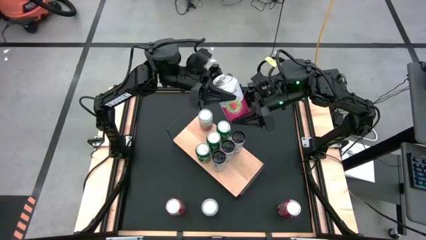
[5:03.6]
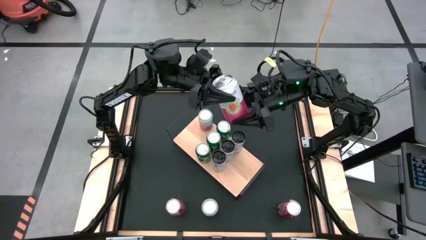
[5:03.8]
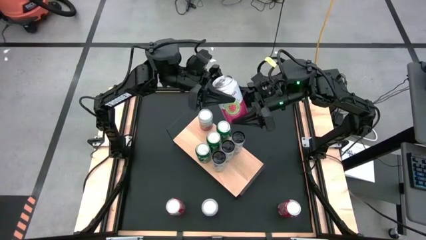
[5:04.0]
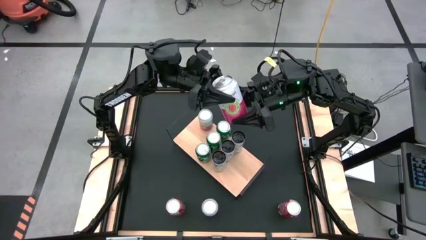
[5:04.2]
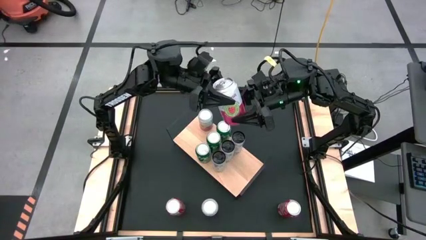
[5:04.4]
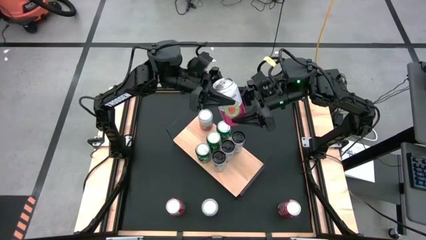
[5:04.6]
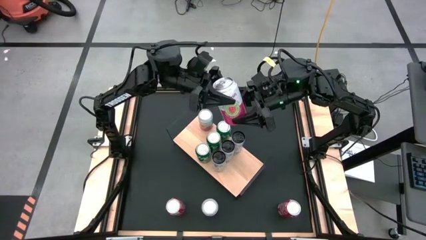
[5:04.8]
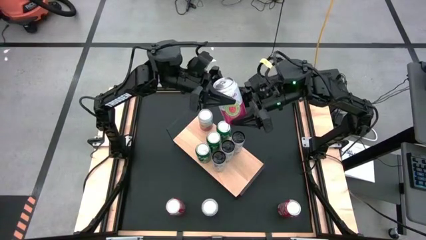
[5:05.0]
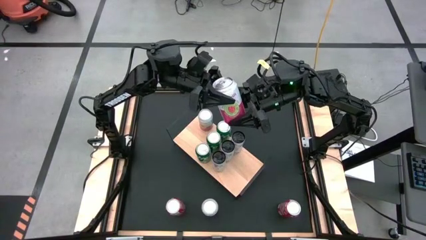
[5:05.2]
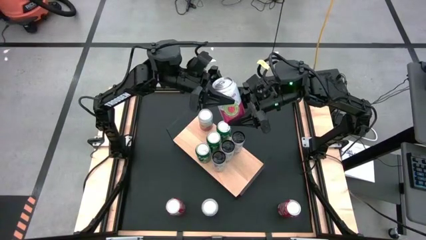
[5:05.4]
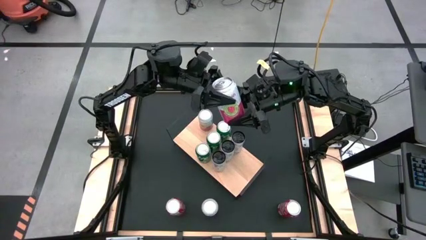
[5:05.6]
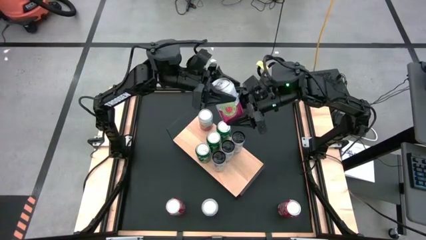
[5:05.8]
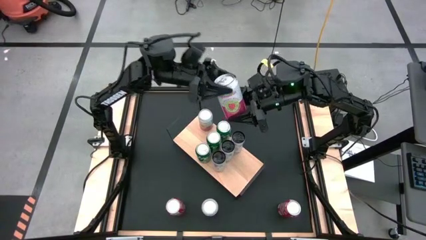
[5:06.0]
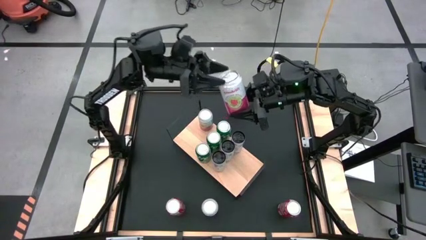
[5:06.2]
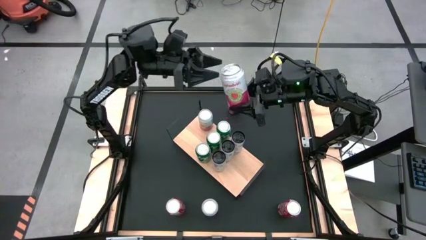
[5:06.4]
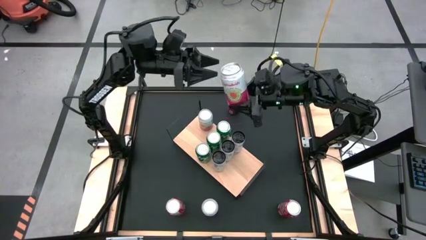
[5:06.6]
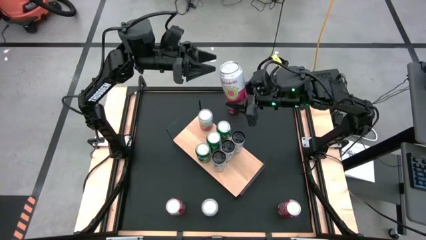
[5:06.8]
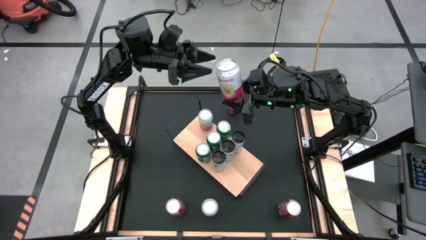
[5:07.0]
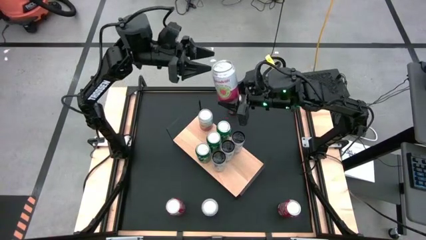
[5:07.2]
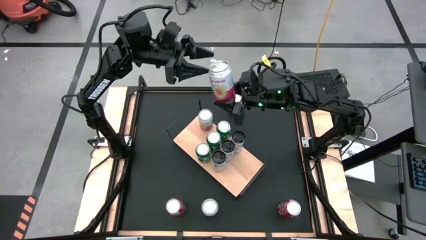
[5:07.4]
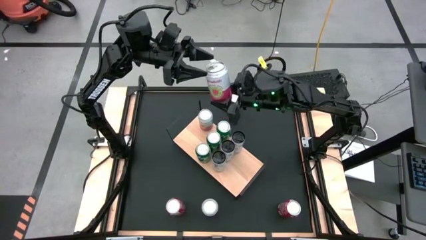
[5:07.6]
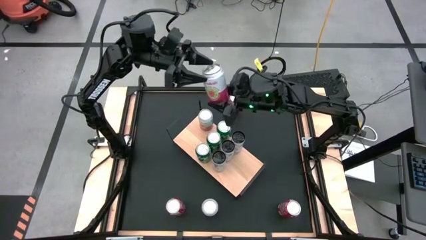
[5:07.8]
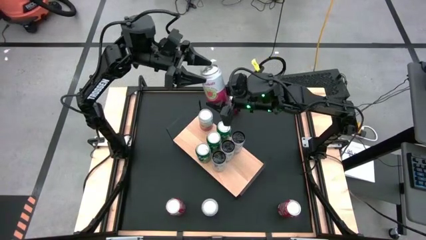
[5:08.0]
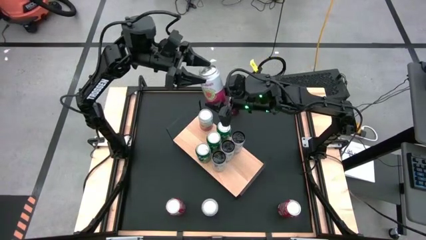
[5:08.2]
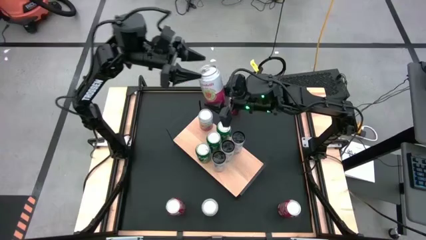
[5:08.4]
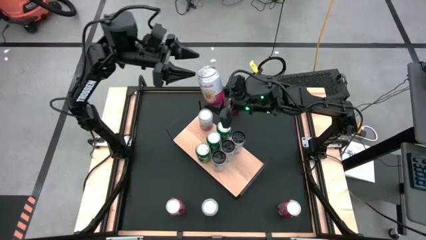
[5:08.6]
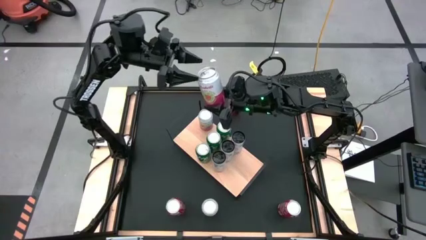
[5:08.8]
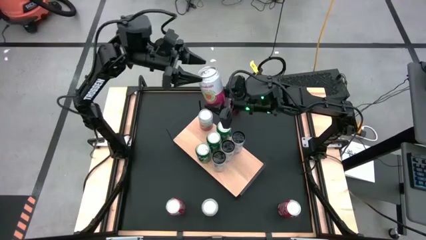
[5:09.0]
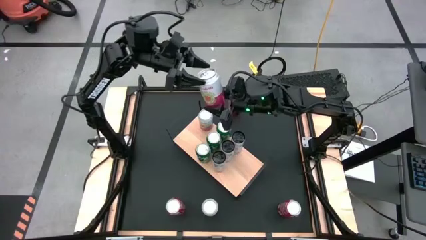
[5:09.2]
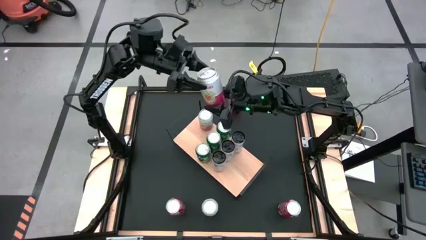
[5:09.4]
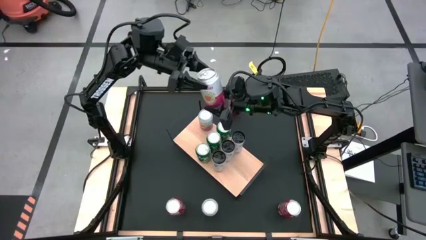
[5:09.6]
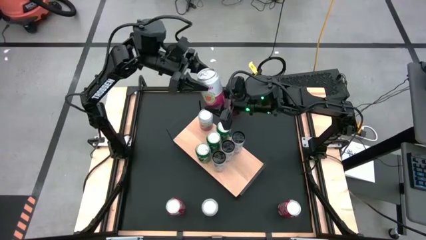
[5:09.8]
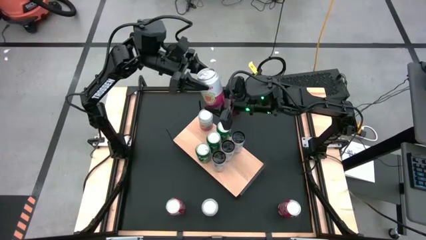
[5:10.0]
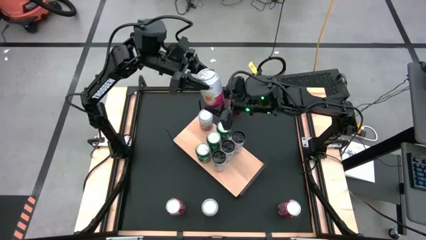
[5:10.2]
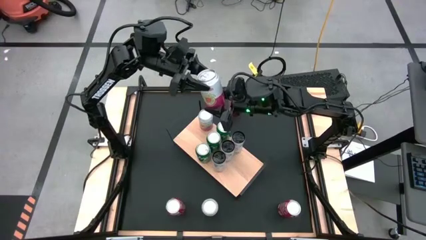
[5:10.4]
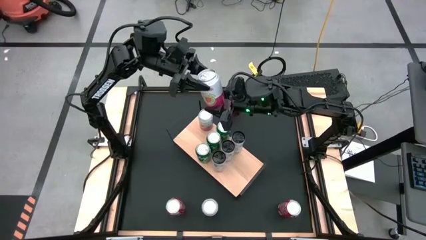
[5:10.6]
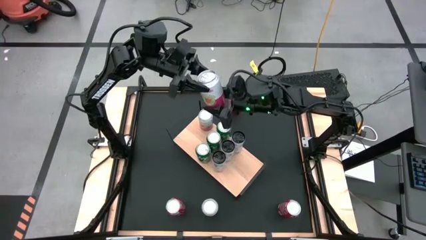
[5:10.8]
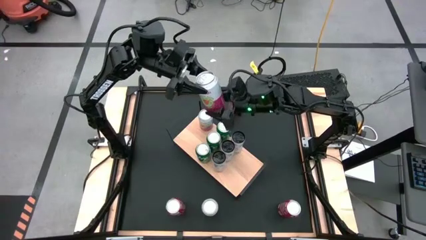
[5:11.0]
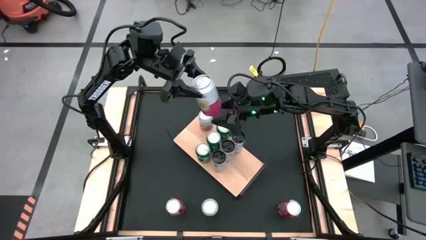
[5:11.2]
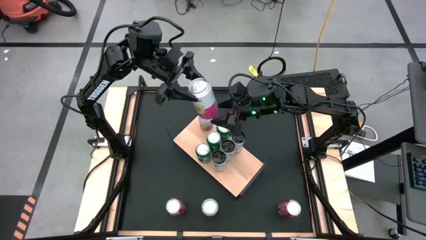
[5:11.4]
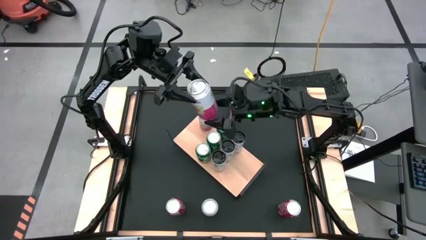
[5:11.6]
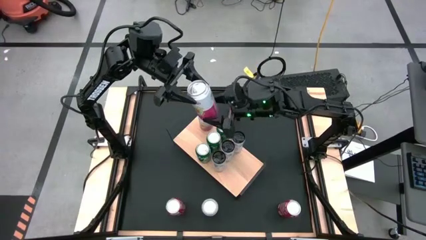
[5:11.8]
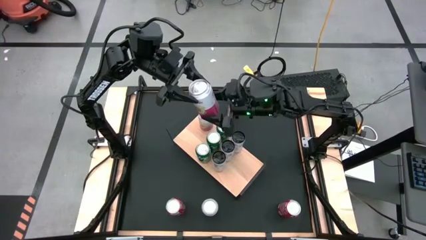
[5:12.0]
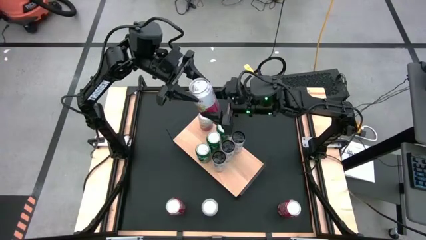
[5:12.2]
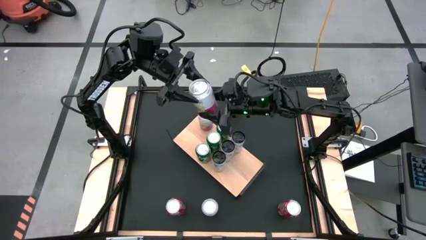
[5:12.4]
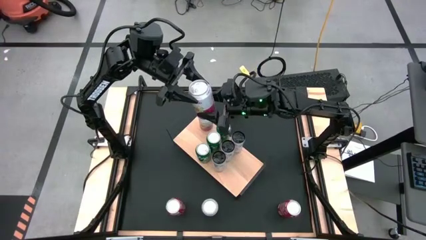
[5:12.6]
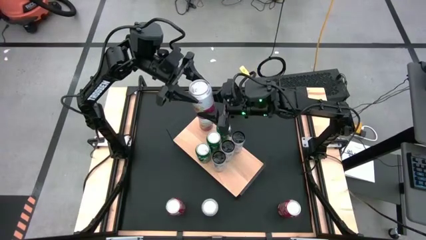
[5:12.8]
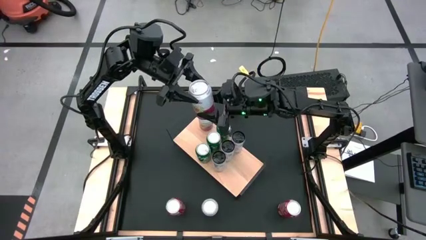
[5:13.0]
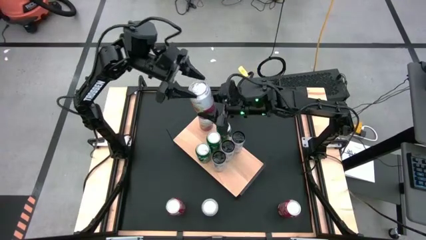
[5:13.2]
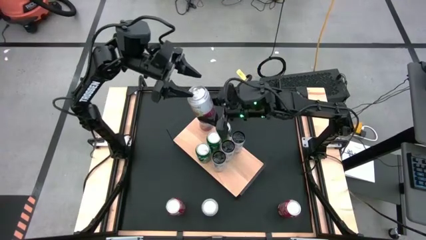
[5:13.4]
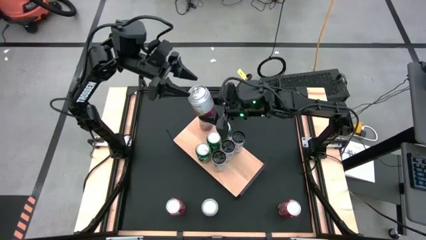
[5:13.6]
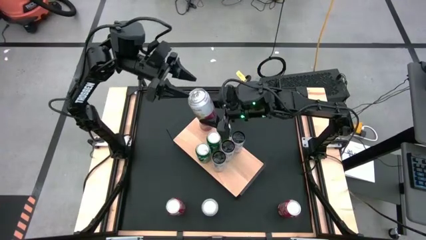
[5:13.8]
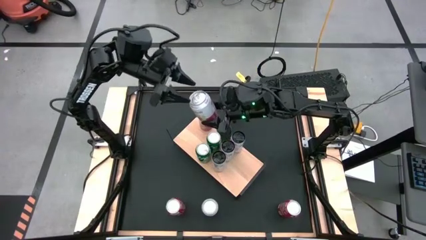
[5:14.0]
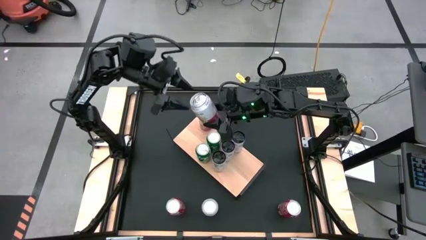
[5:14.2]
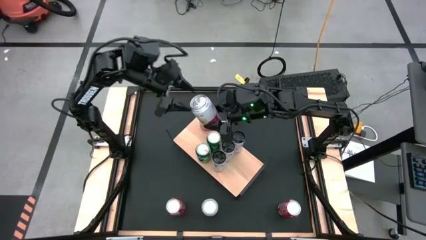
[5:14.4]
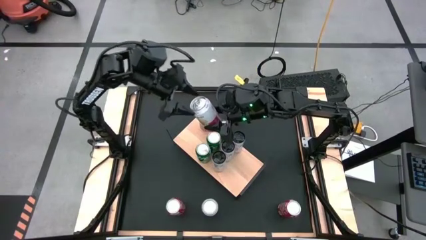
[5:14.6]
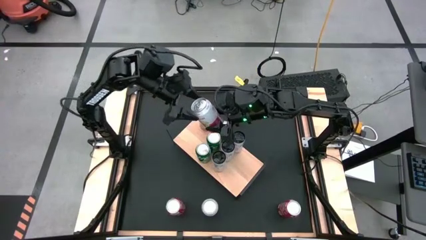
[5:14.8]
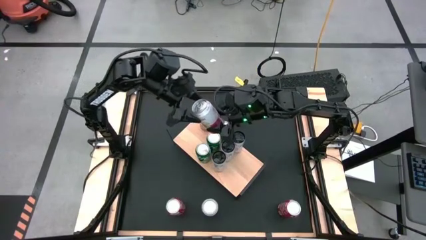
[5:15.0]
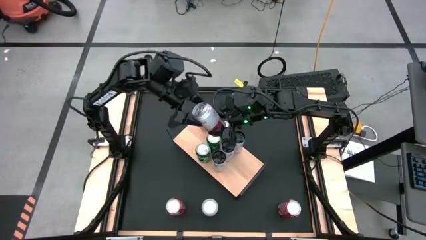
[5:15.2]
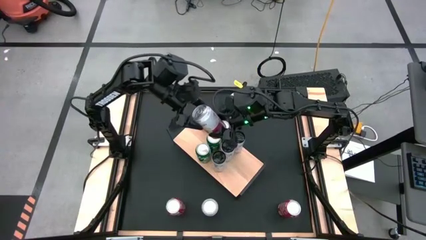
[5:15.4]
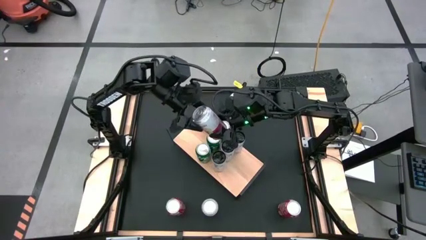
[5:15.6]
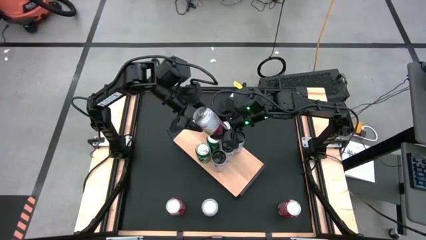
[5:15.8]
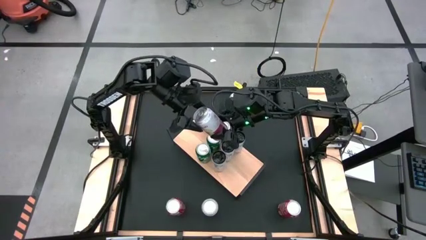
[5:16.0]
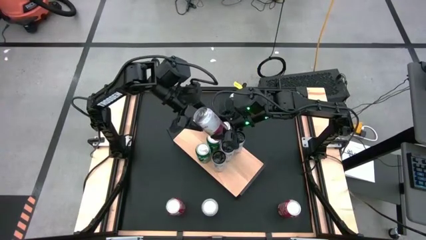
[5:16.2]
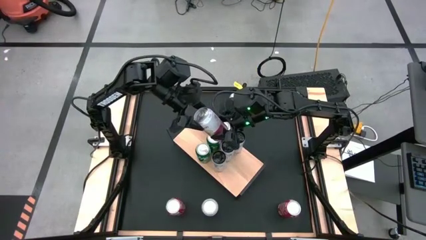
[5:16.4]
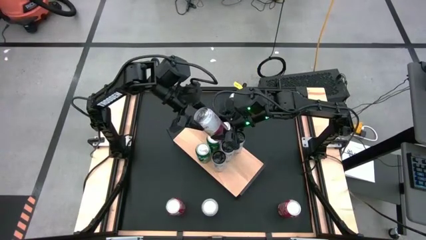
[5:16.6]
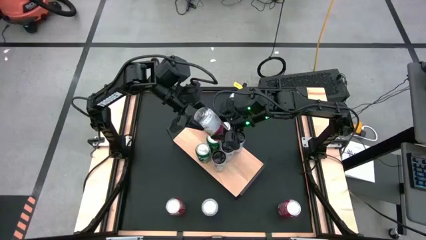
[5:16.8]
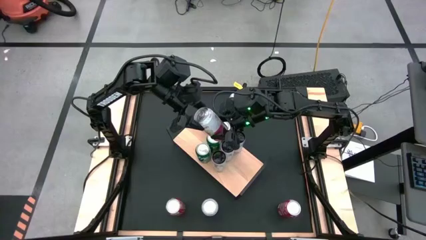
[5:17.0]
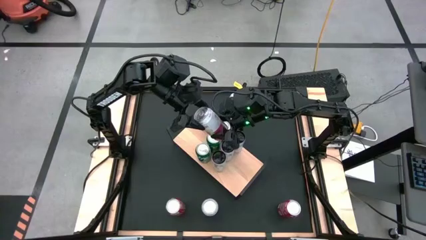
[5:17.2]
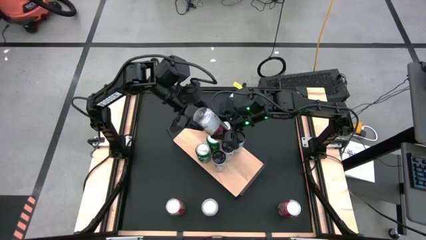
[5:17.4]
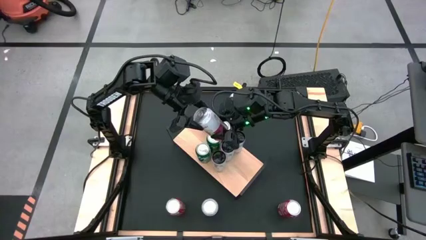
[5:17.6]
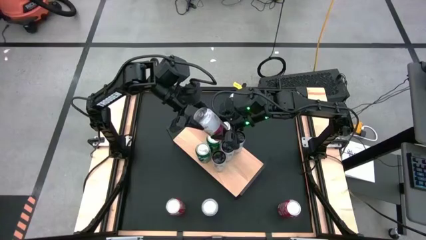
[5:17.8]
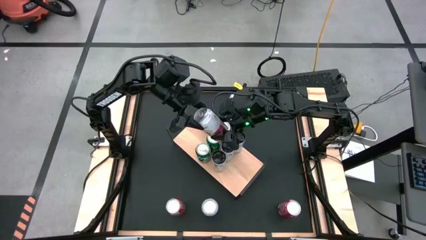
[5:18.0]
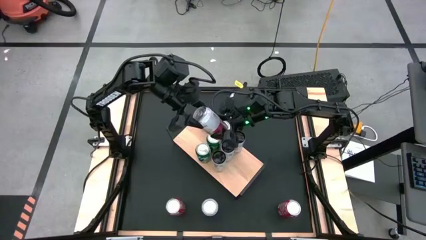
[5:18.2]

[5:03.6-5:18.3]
Task: Place canned beverage on shelf
Put the top white and pink soda can aligned with the other white and pink soda can
